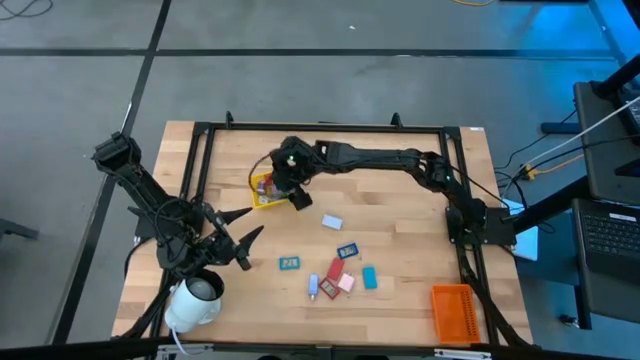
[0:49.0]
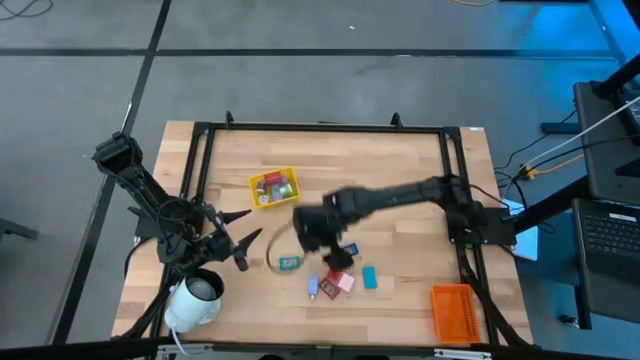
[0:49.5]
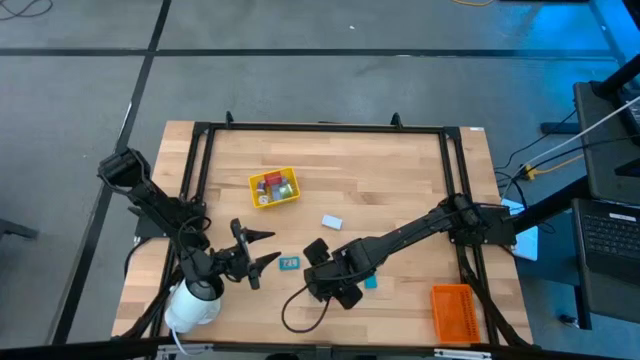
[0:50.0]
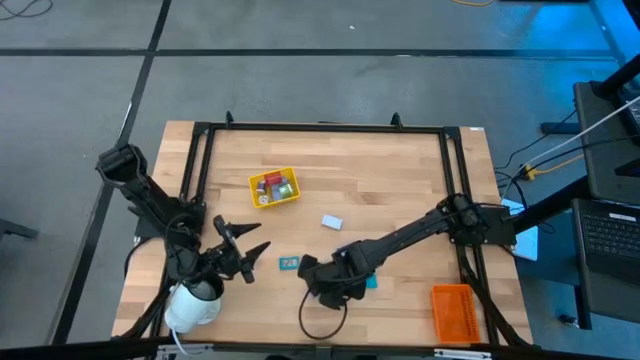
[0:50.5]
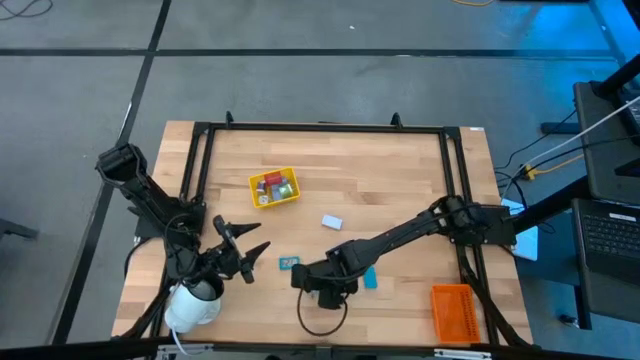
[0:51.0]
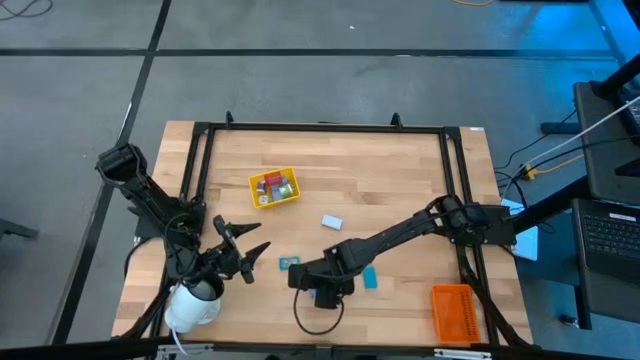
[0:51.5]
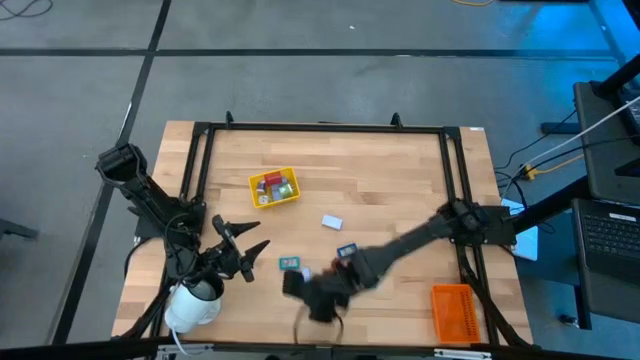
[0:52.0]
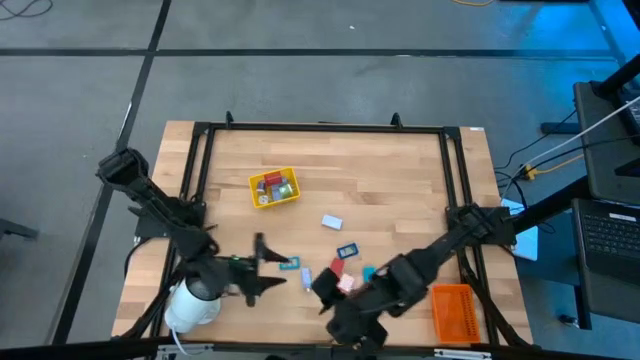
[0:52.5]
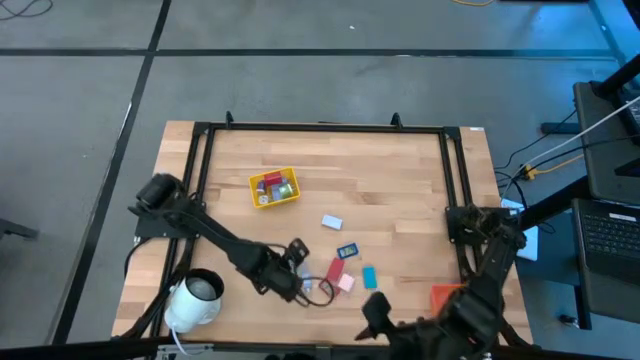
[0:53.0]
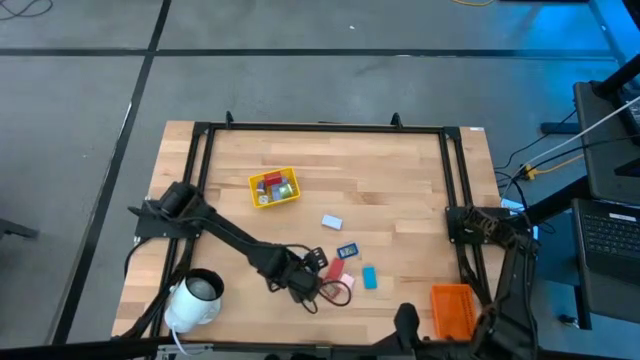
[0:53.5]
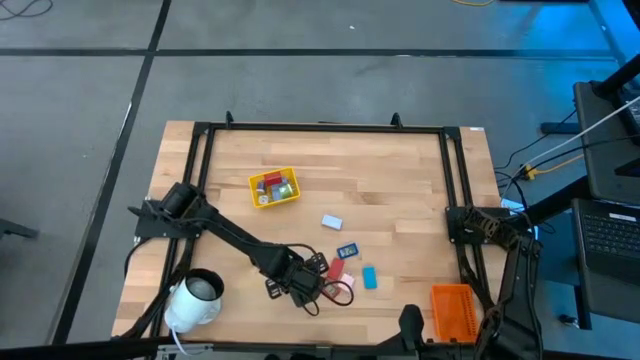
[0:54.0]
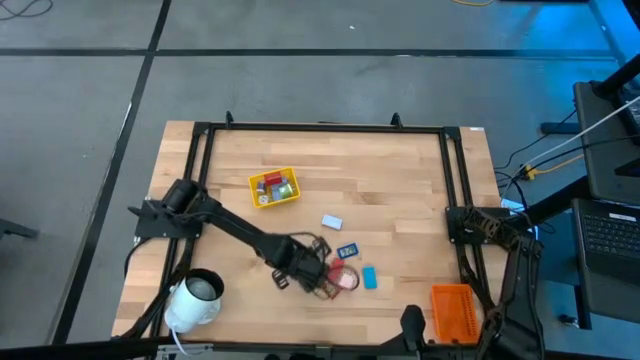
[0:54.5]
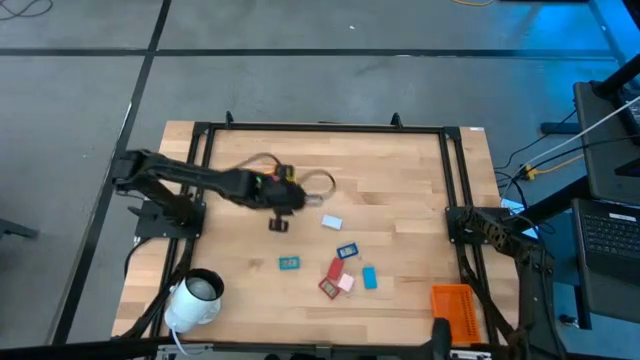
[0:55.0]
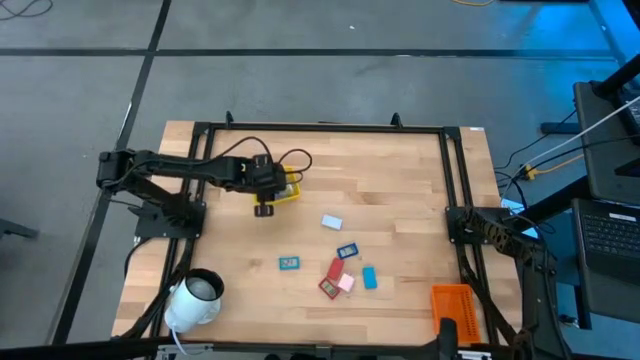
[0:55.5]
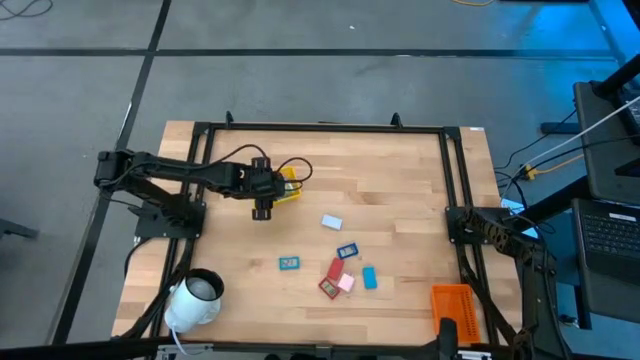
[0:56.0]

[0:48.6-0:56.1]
Task: Pick & Place Office items
Put the light blue charger adapter into the yellow bin

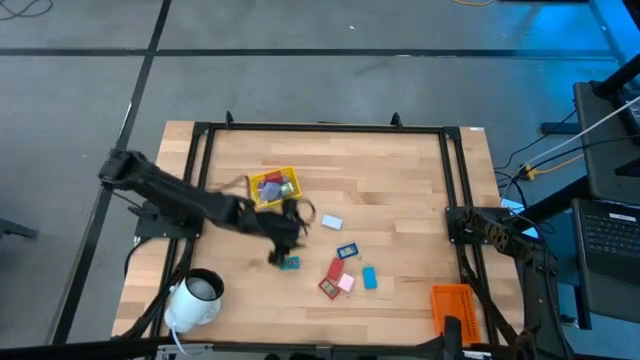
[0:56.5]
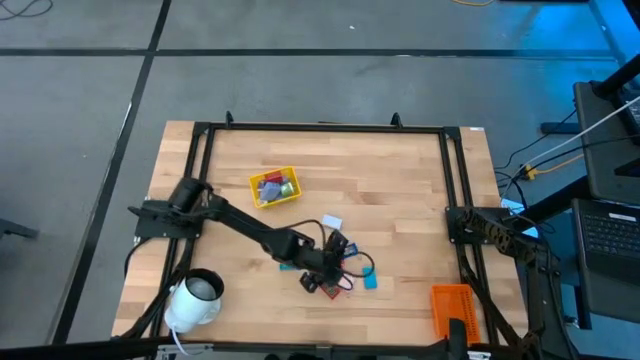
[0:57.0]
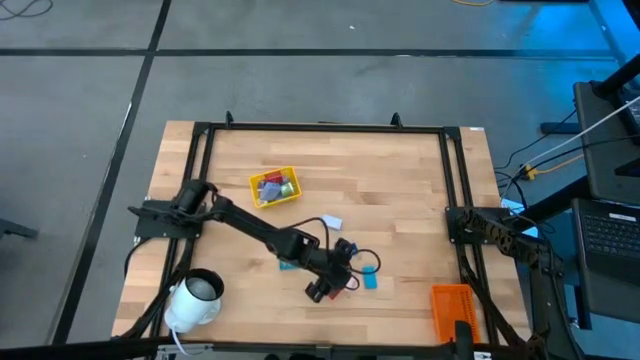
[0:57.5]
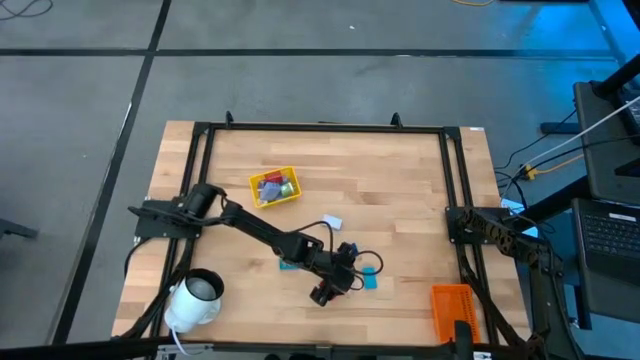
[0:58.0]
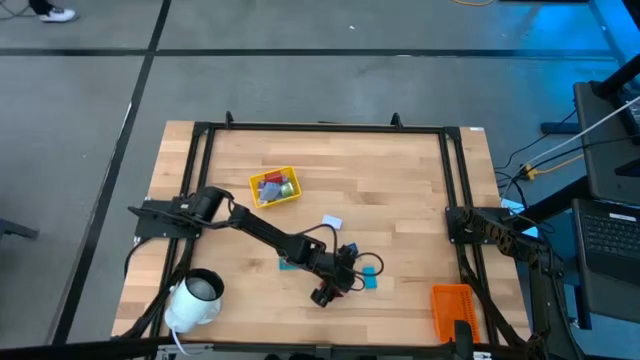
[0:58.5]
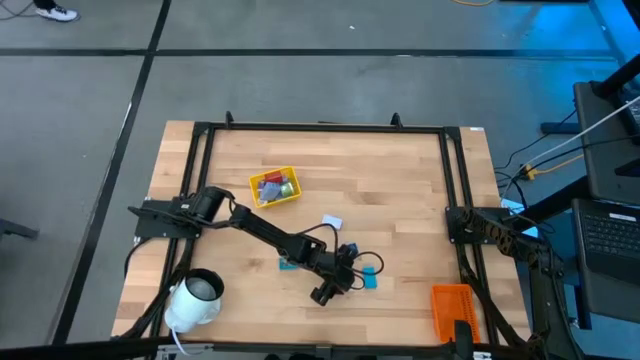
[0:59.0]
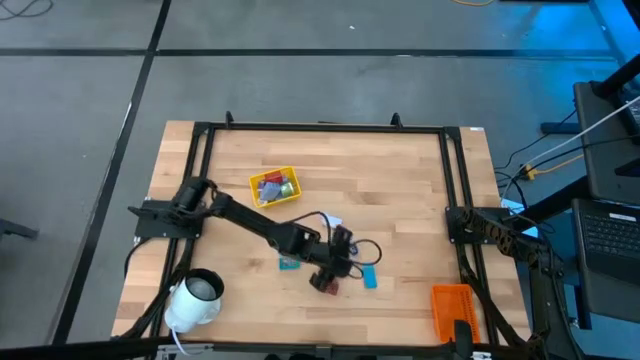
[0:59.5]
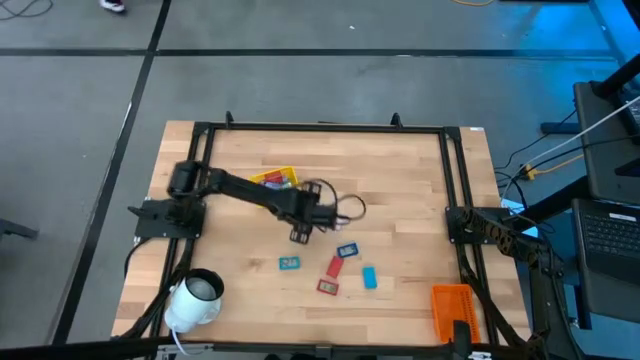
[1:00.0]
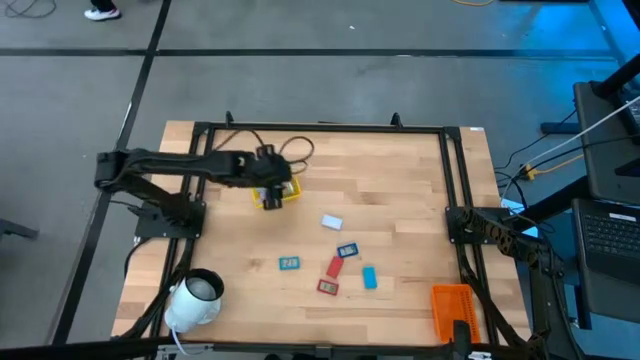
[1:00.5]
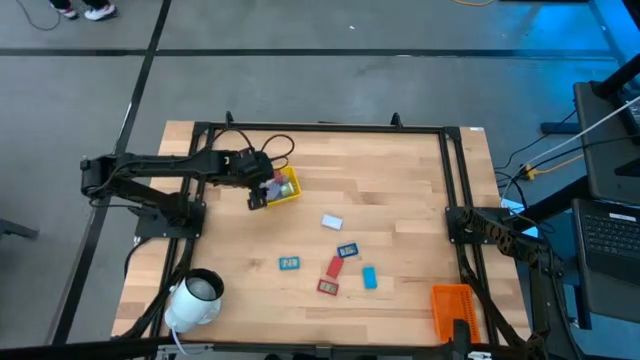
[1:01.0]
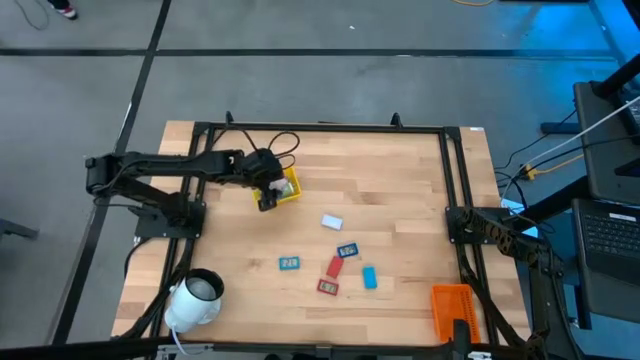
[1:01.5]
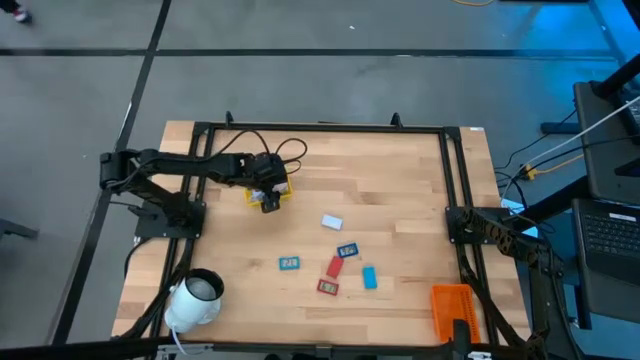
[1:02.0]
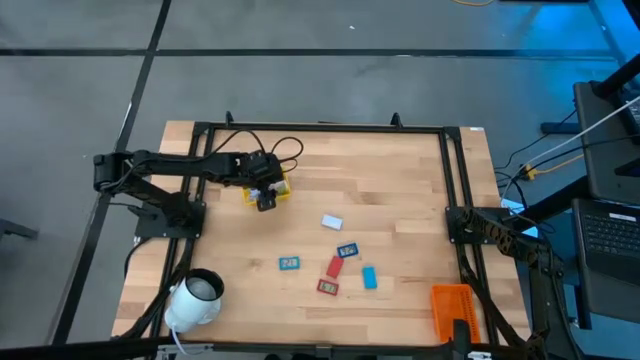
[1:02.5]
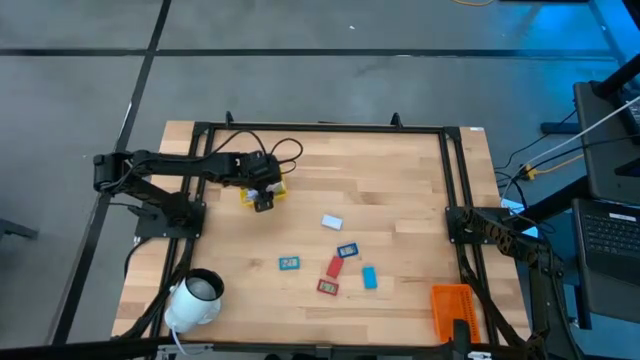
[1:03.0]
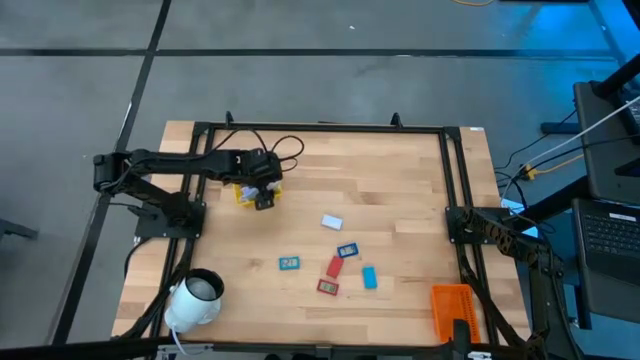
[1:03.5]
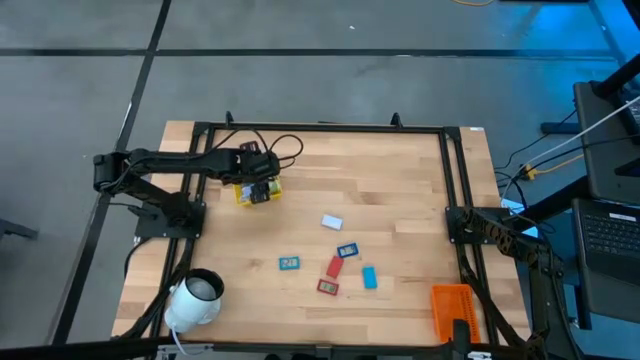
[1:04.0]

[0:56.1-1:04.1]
Put the pink charger adapter into the yellow bin

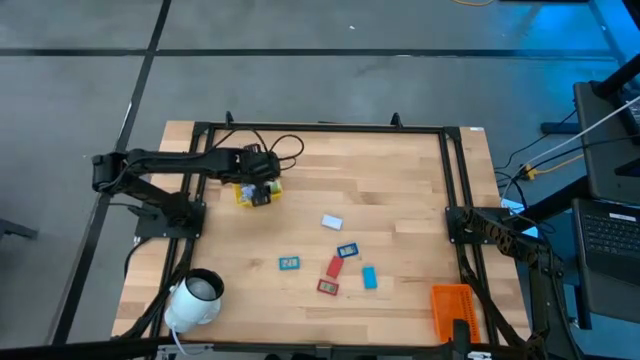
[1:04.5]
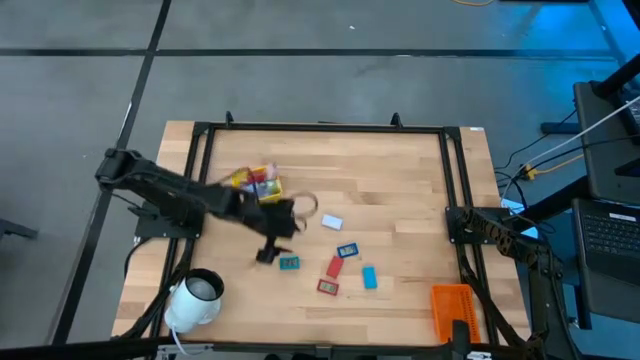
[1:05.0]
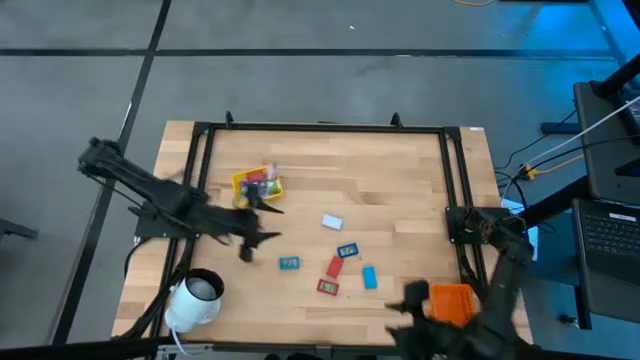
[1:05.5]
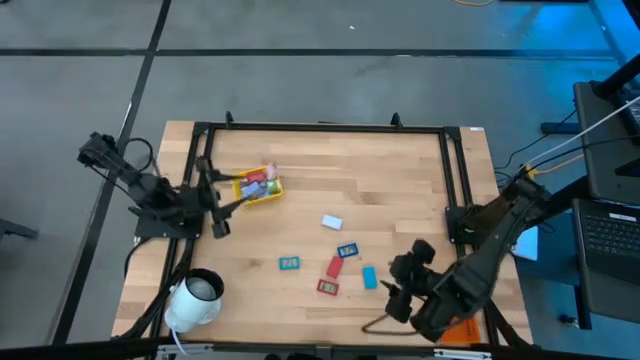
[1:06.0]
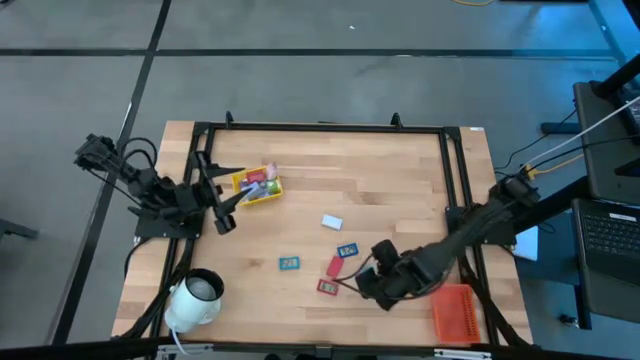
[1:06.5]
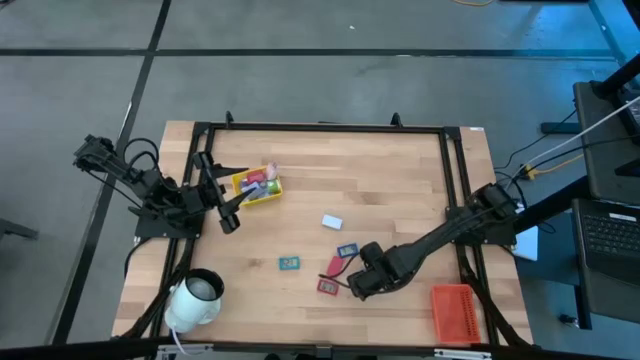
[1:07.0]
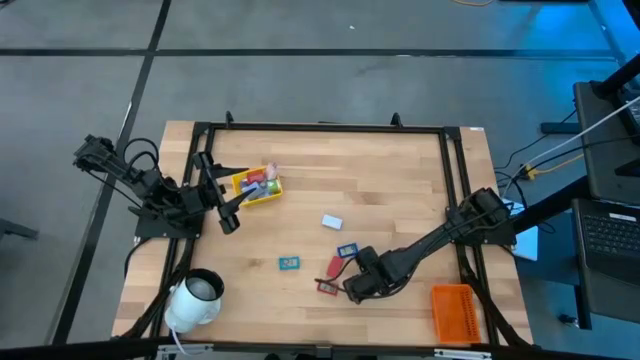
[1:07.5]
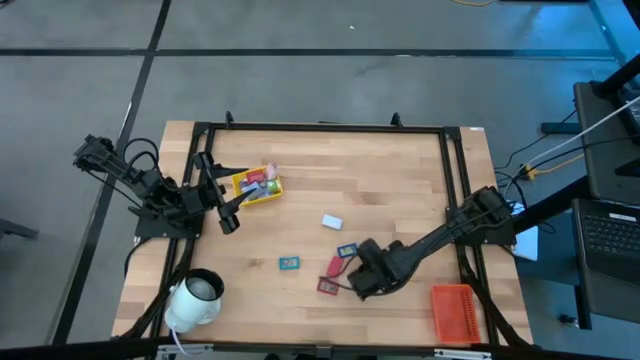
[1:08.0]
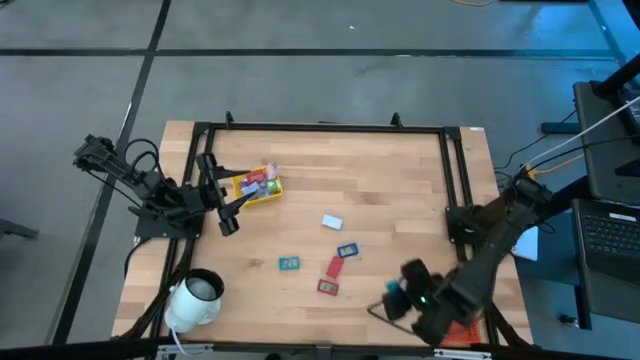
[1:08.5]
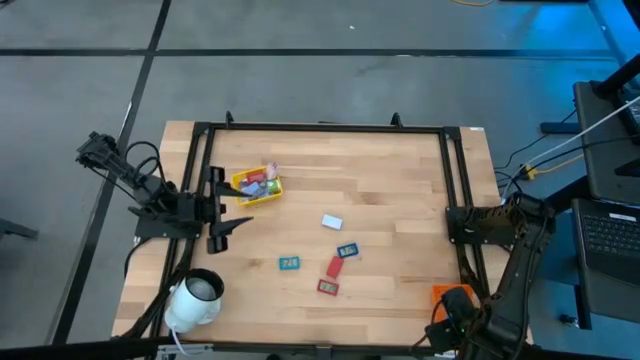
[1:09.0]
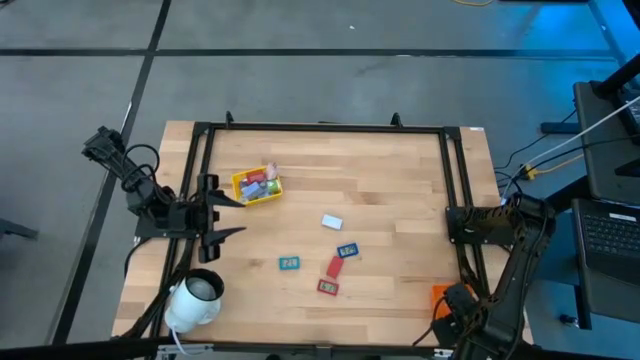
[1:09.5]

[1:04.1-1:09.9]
Put the right light blue digital timer into the orange bin

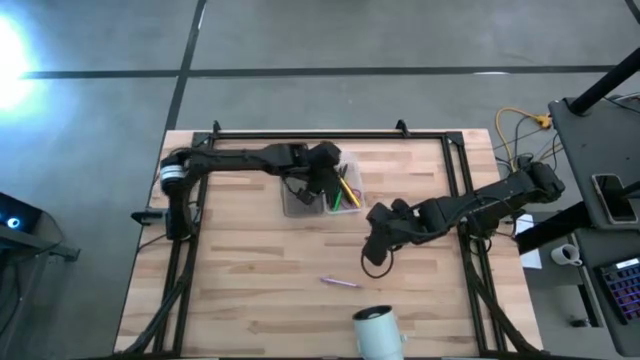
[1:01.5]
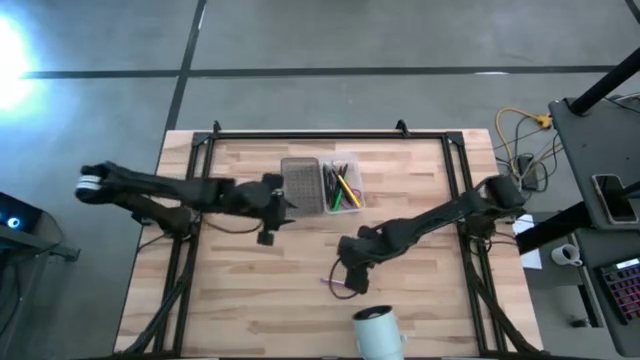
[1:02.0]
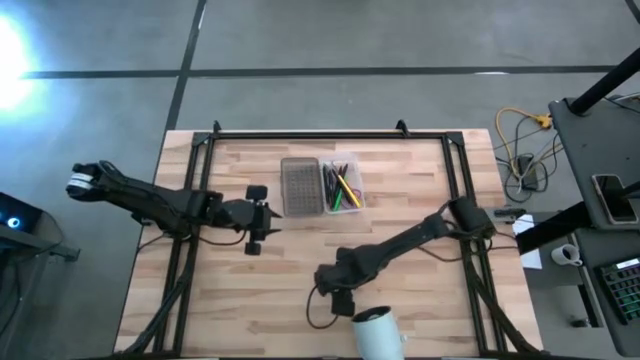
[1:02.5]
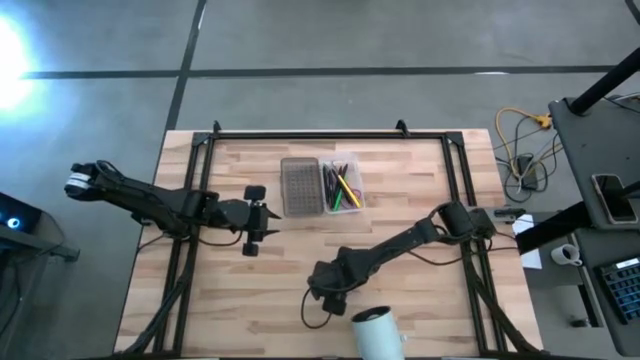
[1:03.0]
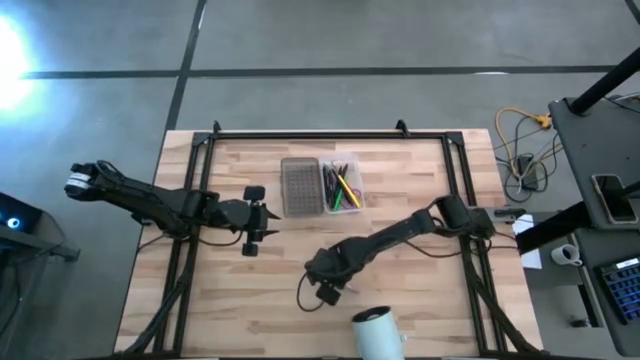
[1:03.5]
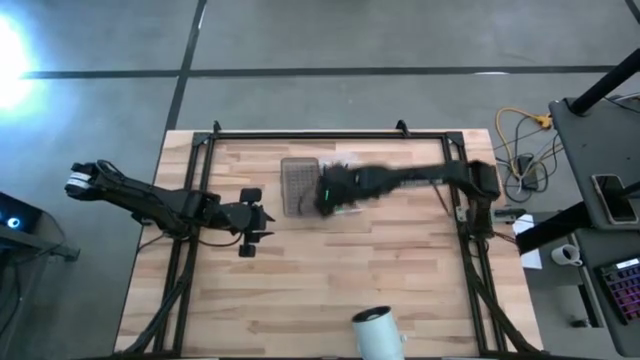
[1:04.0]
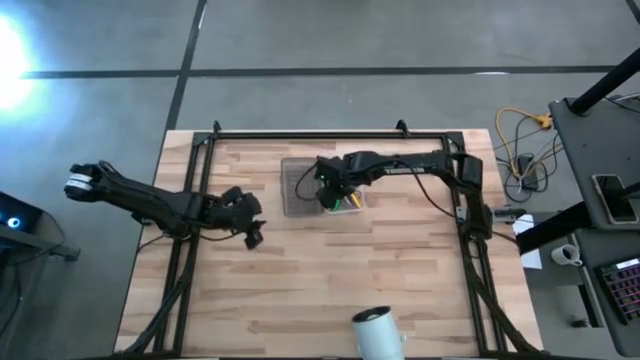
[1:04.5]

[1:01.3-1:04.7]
Task: Pick & place school supplies into a supply box
Put the purple pen into the gray supply box
